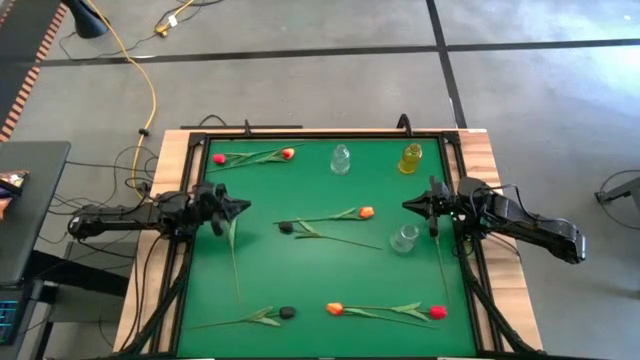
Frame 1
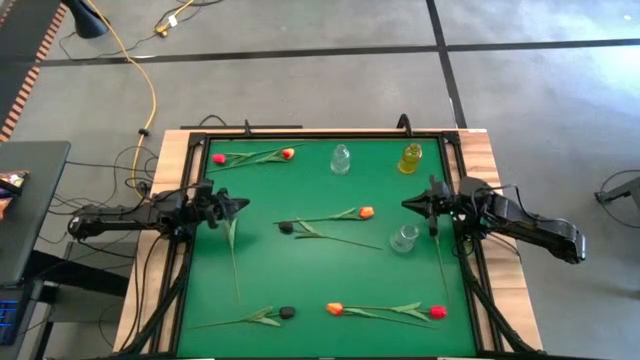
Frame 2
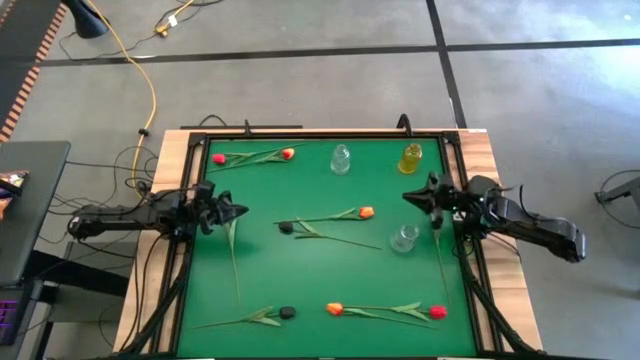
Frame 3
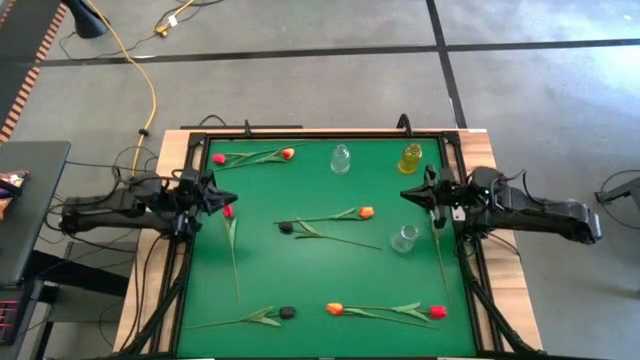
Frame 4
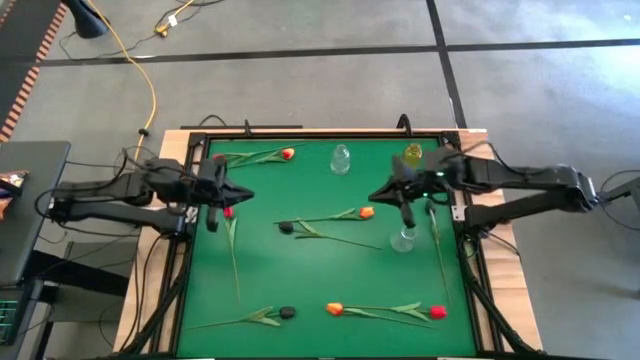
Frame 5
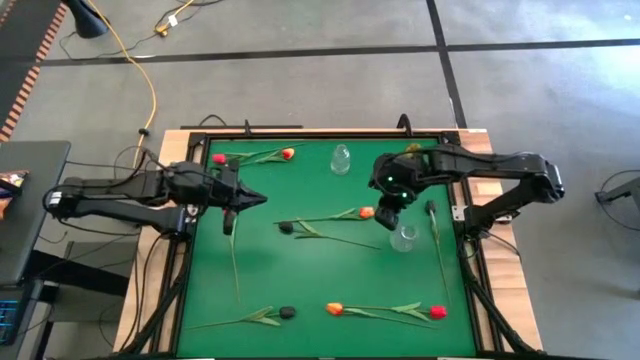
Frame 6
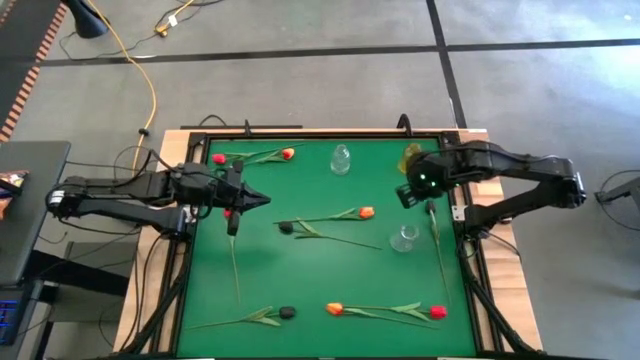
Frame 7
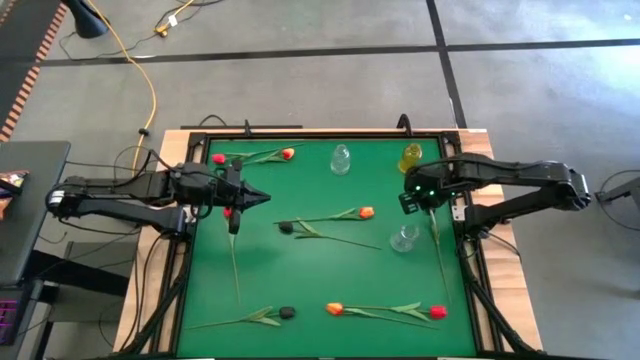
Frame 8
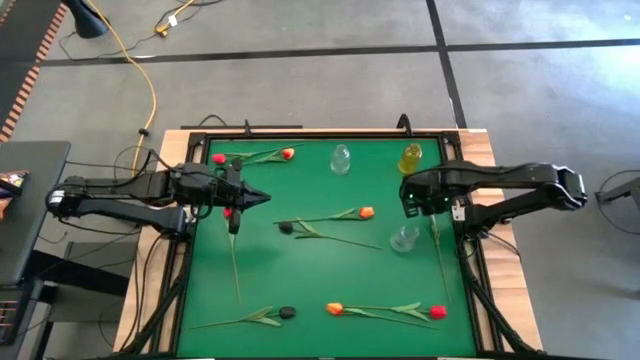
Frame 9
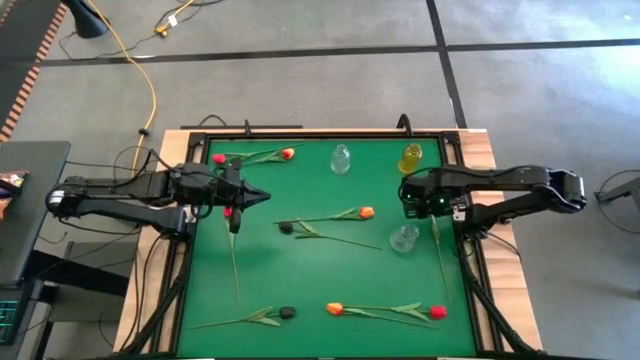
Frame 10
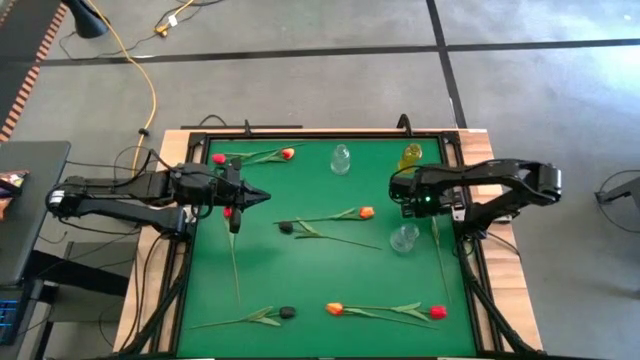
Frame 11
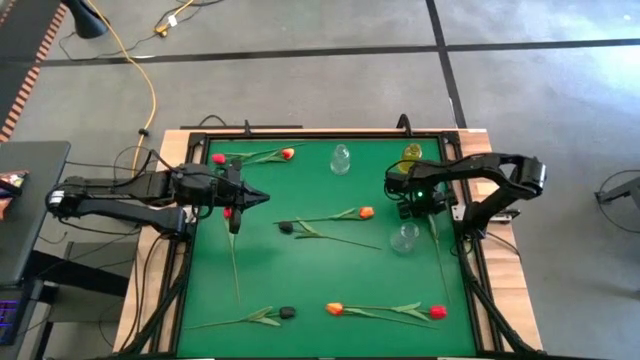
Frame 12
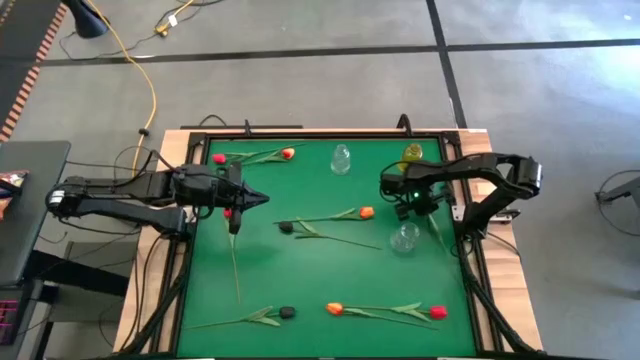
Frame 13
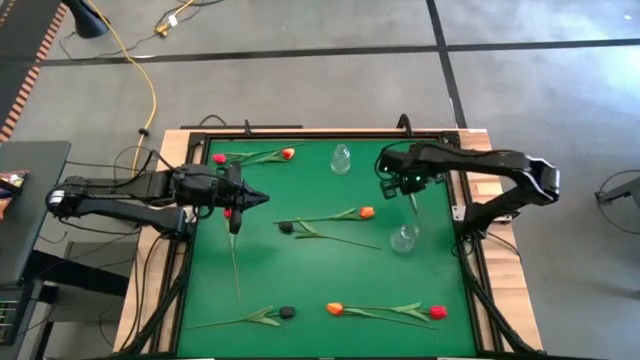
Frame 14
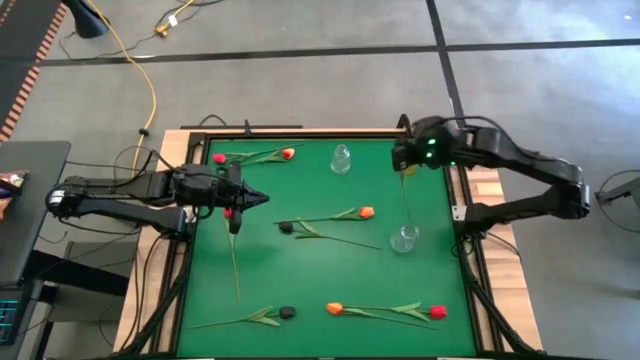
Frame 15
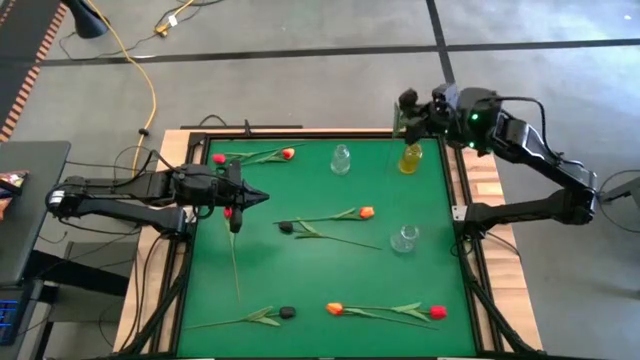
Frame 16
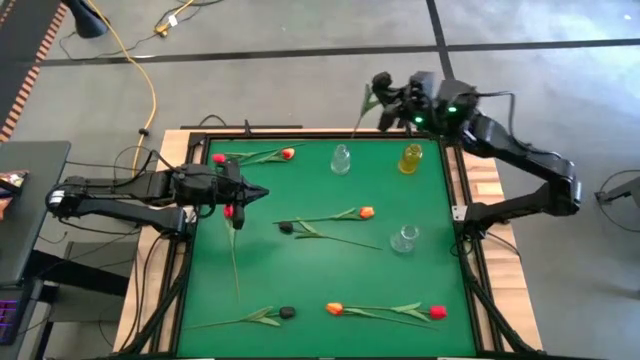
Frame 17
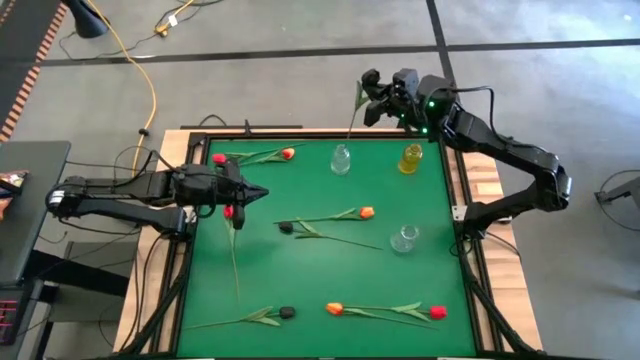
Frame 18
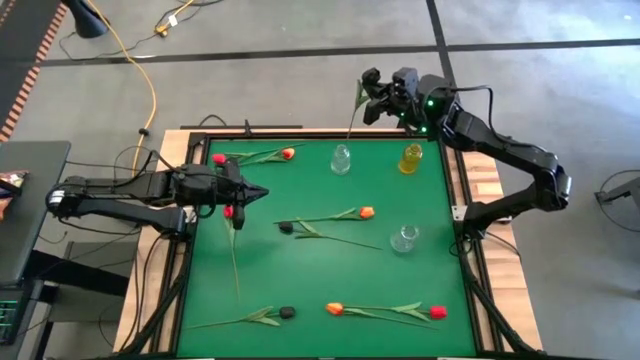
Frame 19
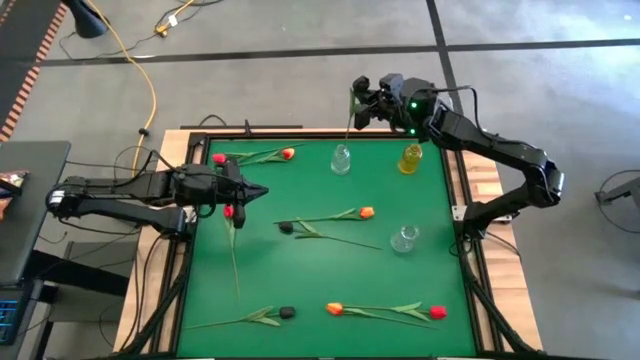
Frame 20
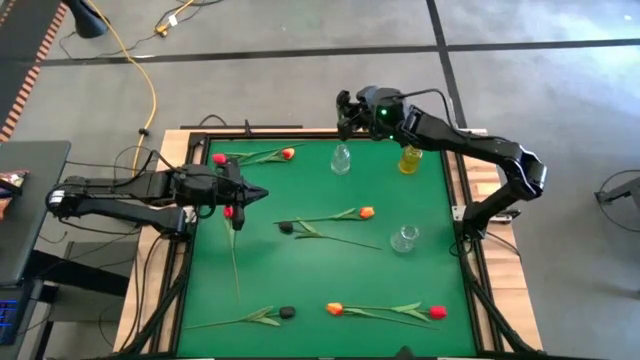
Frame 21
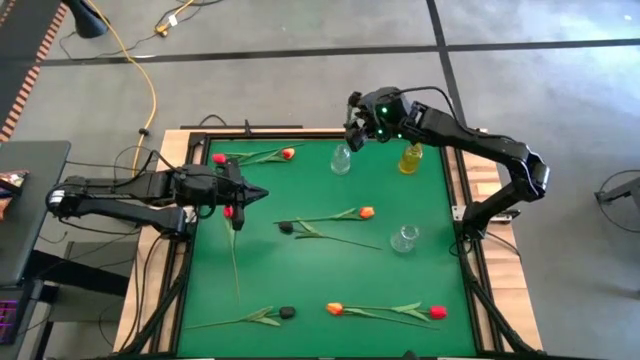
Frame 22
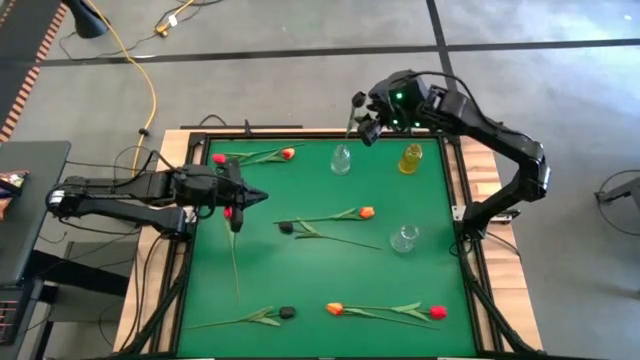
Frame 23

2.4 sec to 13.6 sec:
Task: Sort flowers into vase by color
Put the top right black flower into the top transparent vase

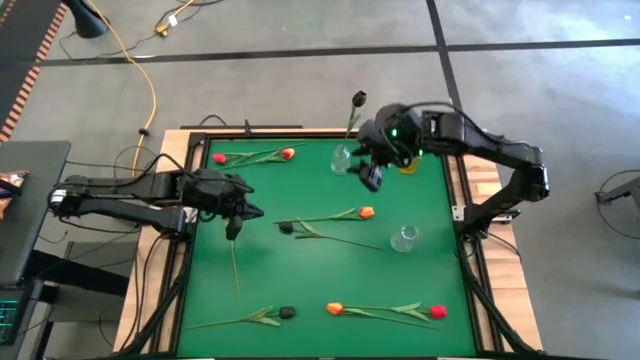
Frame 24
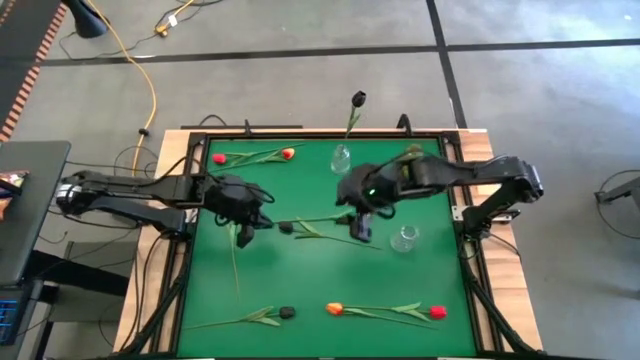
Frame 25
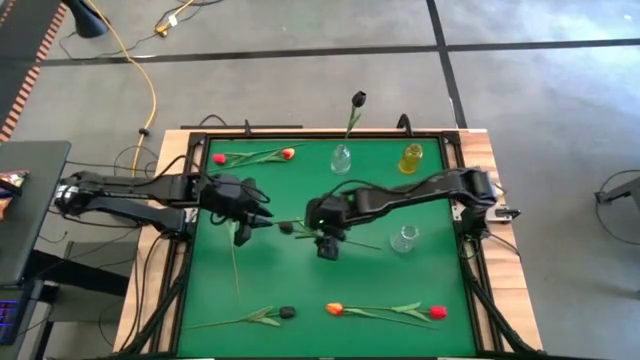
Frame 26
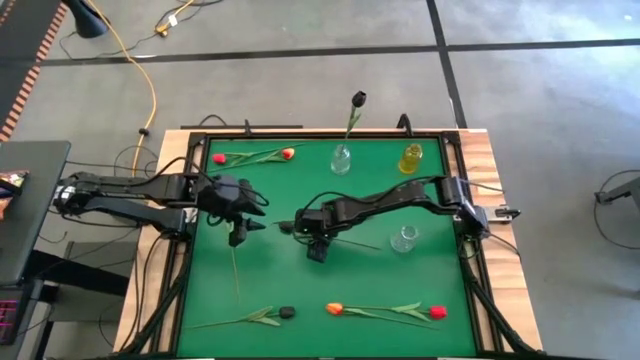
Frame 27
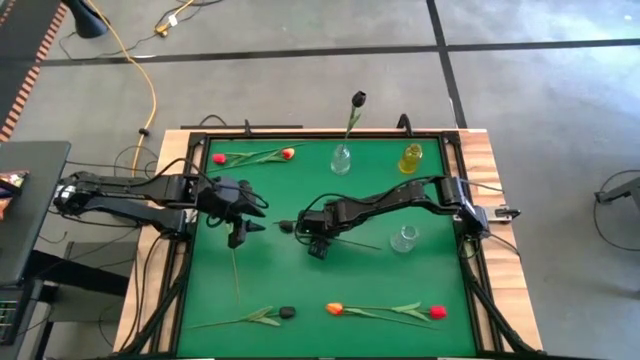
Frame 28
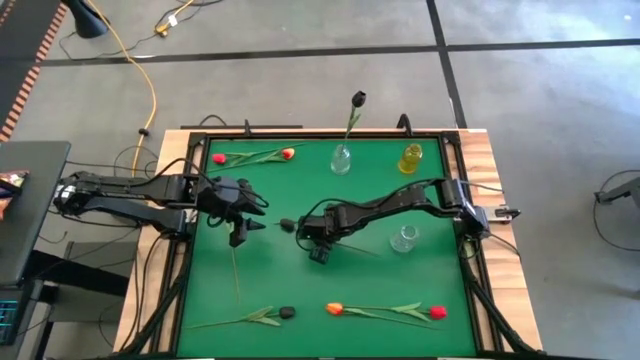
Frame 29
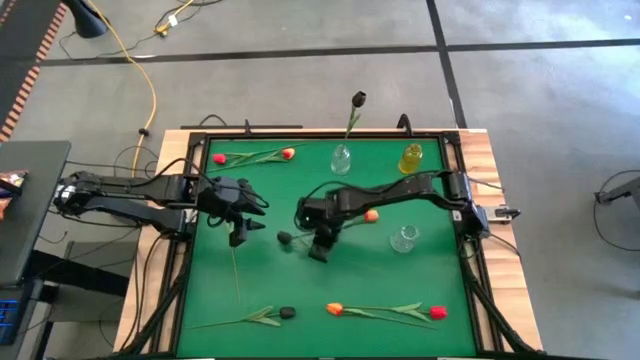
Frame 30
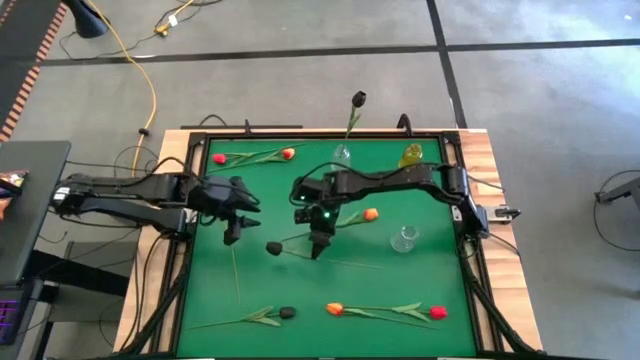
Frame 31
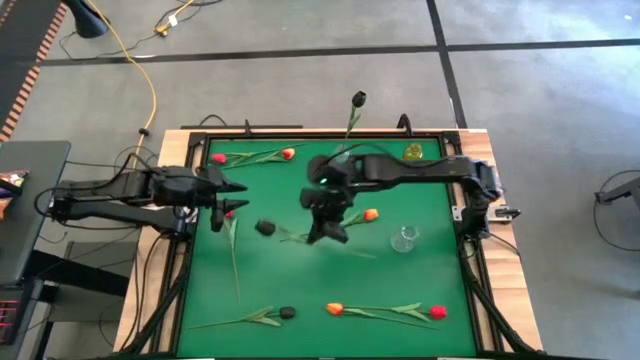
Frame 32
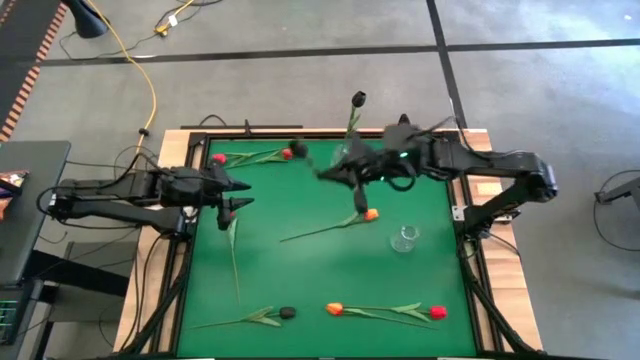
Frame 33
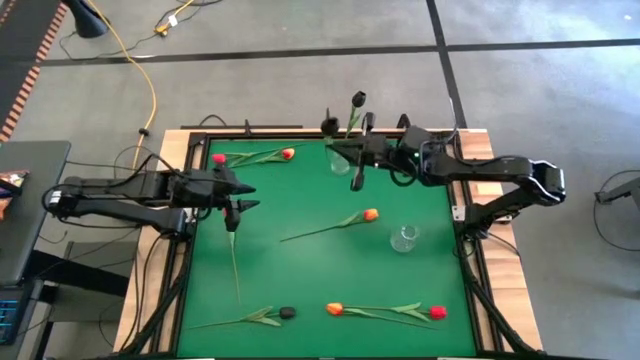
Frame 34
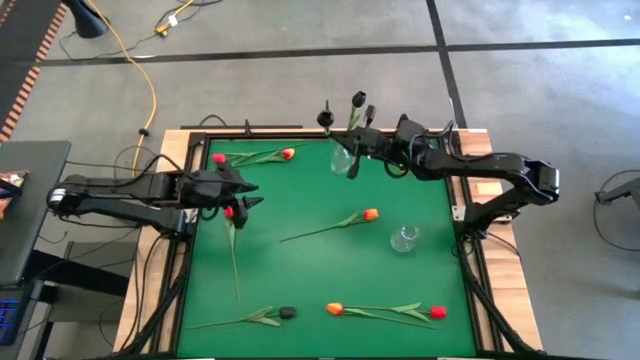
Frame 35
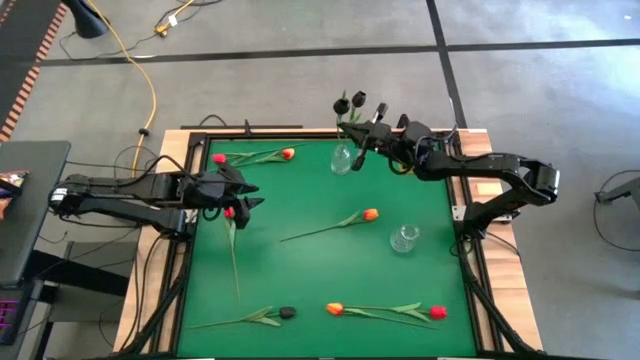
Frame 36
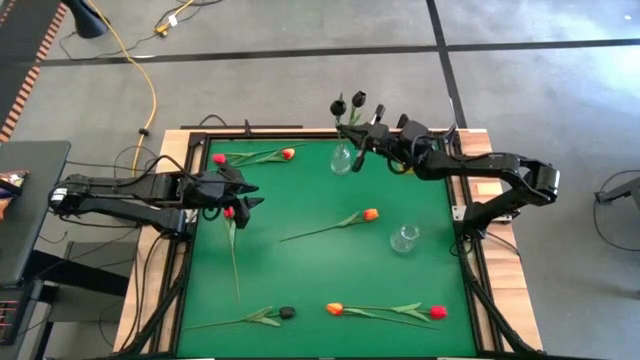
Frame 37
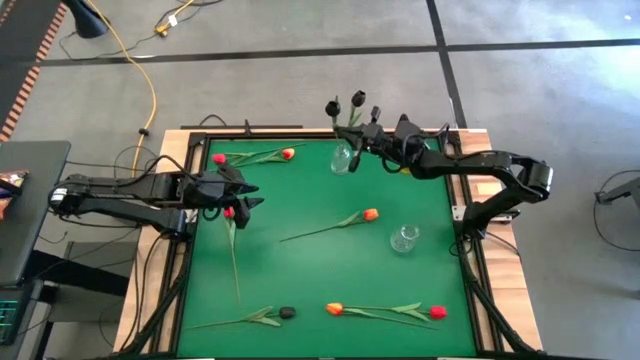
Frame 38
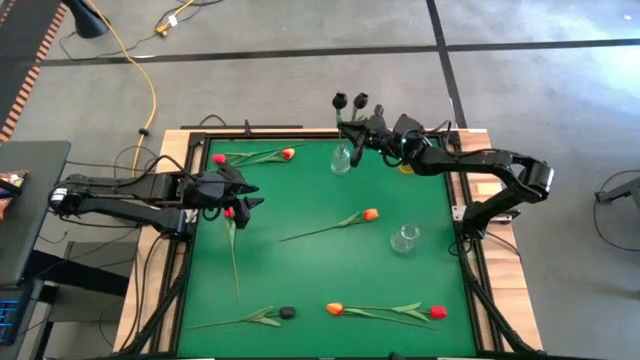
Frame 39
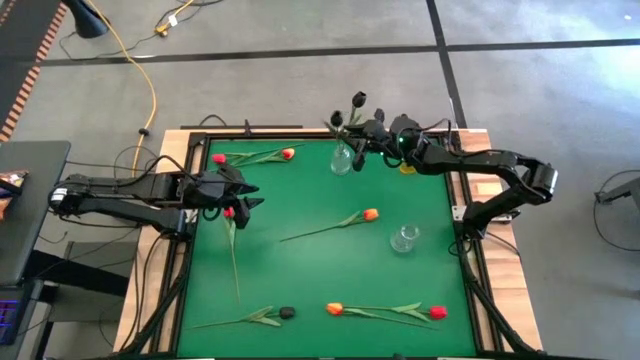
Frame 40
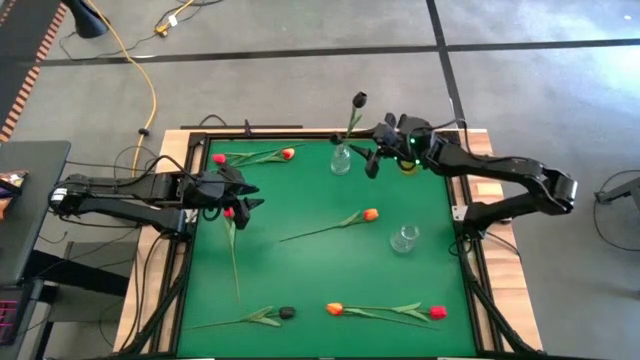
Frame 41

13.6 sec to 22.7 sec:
Put the top black flower into the top transparent vase
